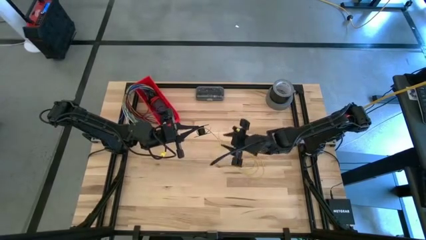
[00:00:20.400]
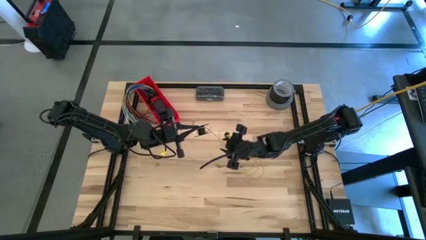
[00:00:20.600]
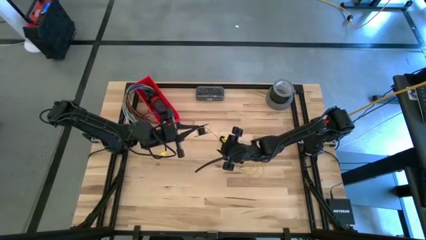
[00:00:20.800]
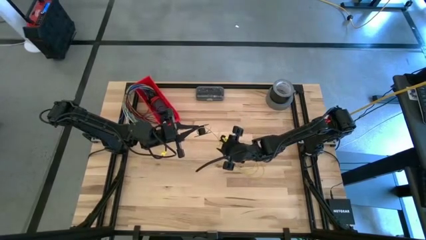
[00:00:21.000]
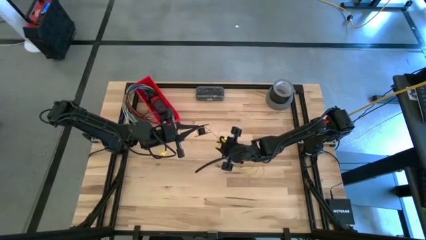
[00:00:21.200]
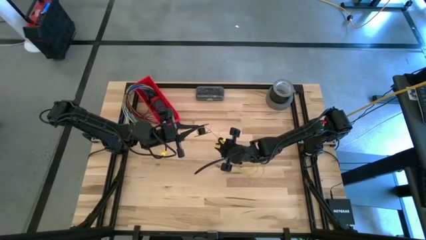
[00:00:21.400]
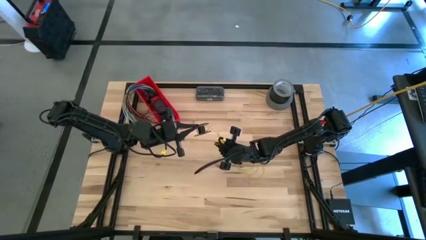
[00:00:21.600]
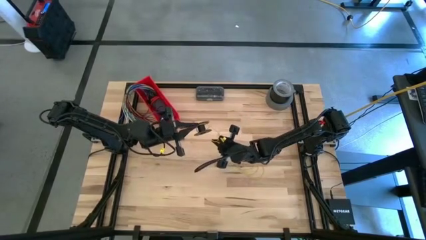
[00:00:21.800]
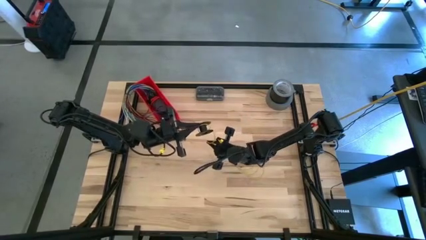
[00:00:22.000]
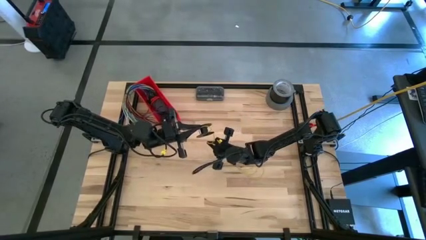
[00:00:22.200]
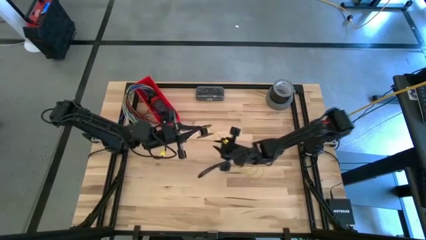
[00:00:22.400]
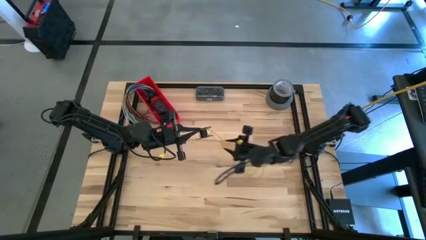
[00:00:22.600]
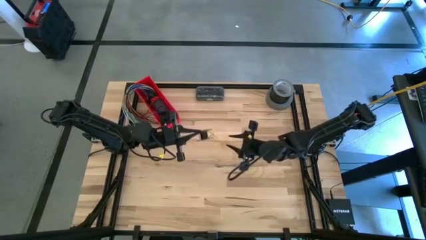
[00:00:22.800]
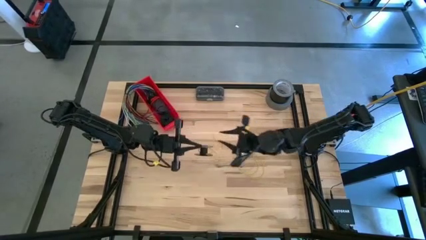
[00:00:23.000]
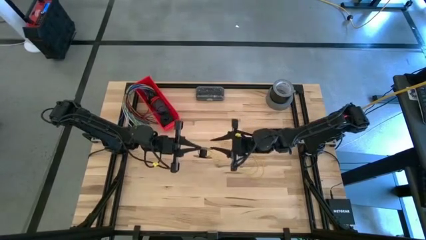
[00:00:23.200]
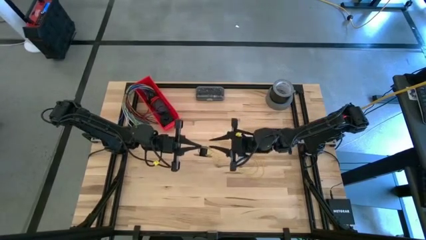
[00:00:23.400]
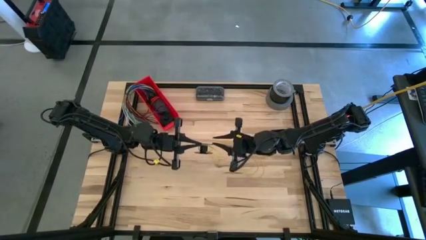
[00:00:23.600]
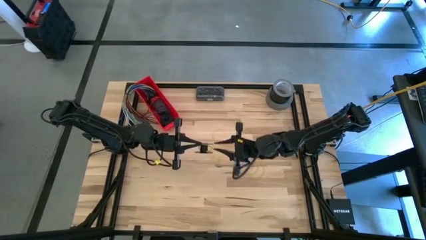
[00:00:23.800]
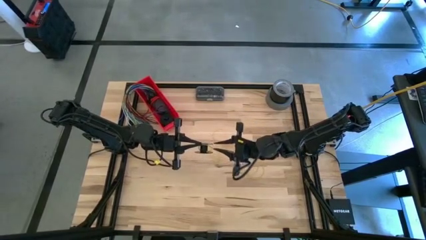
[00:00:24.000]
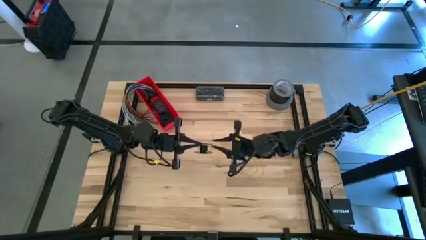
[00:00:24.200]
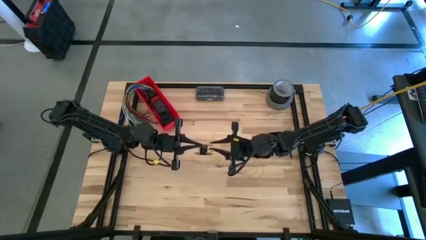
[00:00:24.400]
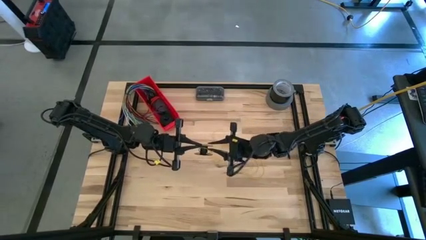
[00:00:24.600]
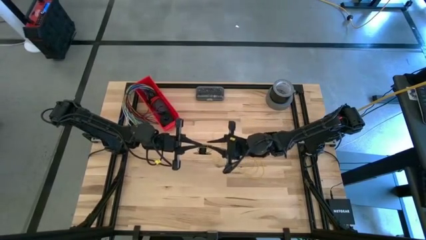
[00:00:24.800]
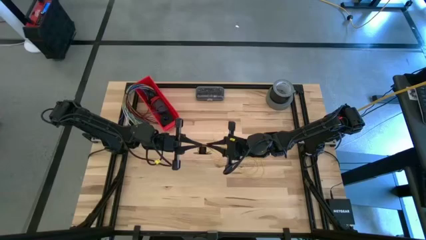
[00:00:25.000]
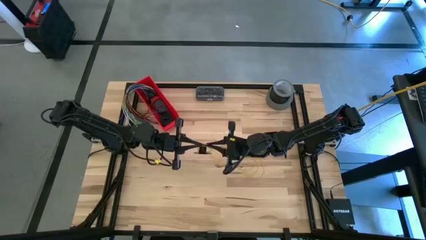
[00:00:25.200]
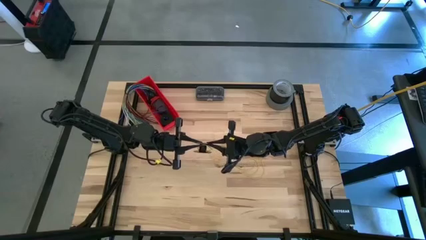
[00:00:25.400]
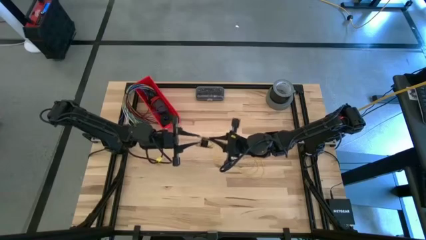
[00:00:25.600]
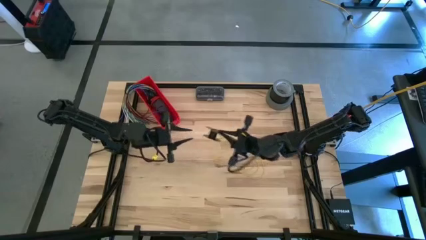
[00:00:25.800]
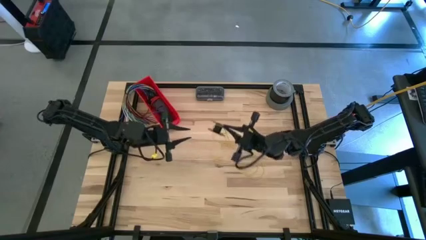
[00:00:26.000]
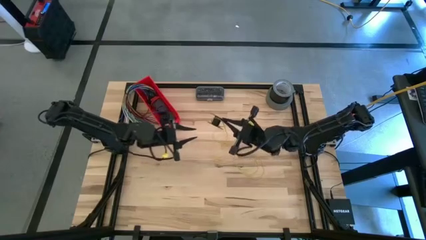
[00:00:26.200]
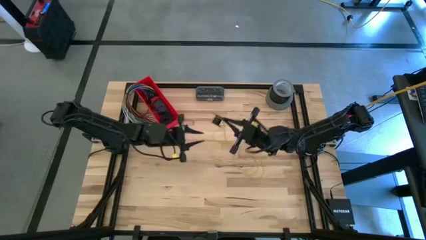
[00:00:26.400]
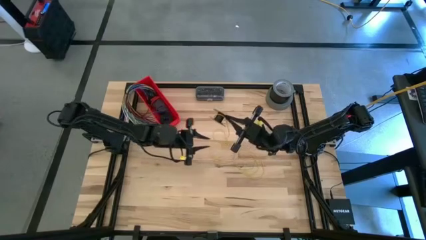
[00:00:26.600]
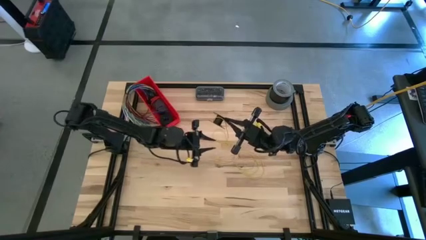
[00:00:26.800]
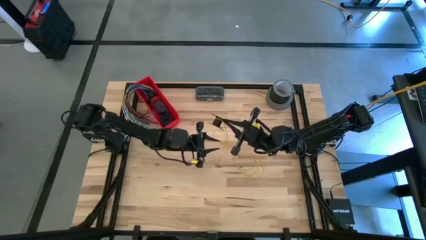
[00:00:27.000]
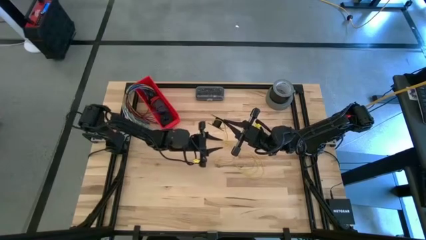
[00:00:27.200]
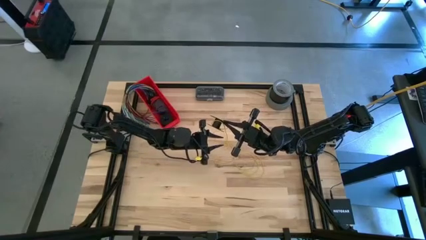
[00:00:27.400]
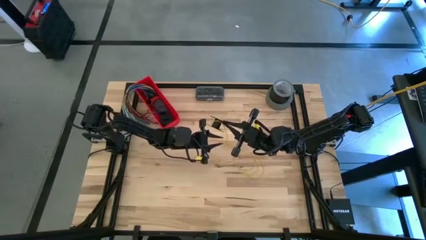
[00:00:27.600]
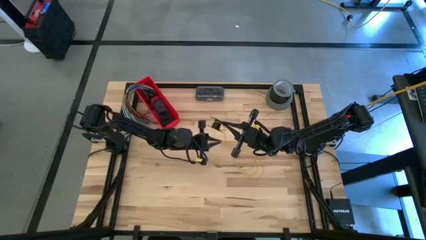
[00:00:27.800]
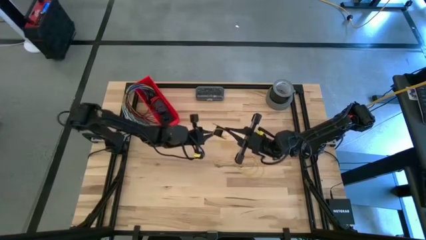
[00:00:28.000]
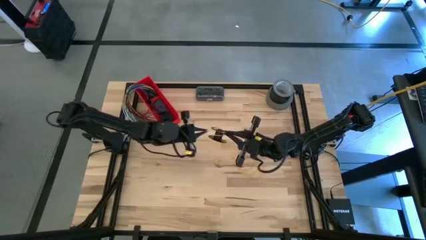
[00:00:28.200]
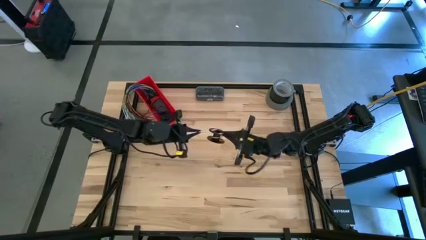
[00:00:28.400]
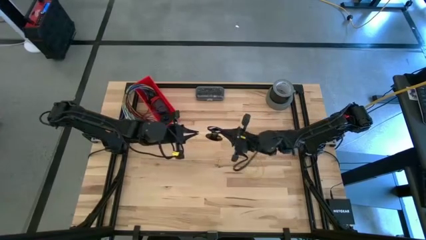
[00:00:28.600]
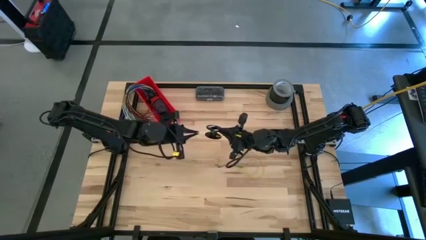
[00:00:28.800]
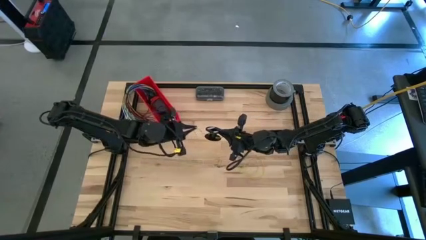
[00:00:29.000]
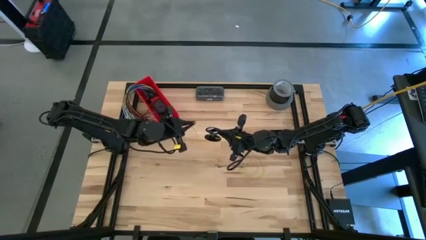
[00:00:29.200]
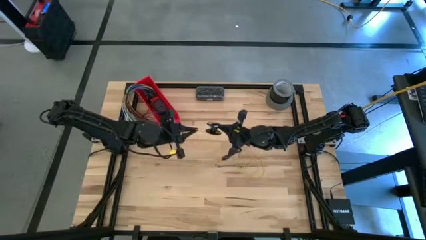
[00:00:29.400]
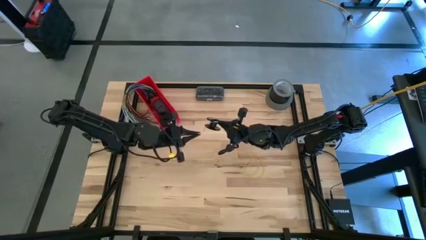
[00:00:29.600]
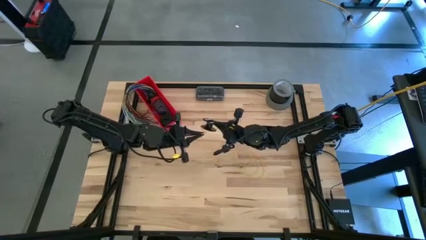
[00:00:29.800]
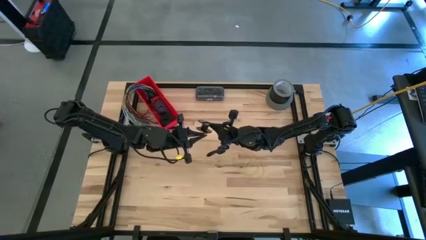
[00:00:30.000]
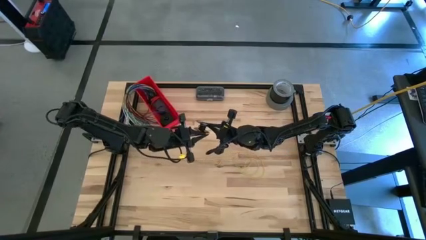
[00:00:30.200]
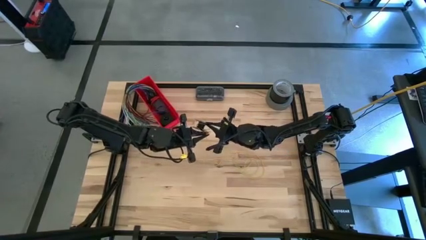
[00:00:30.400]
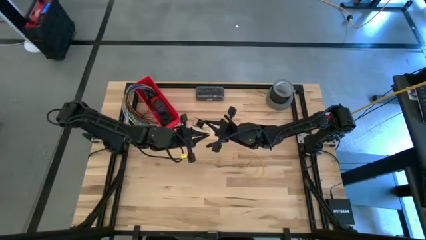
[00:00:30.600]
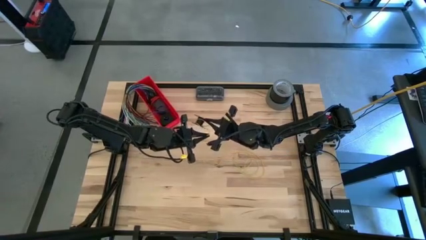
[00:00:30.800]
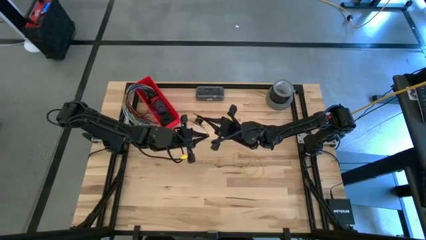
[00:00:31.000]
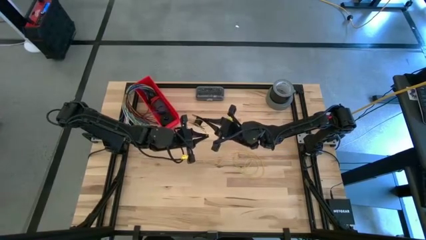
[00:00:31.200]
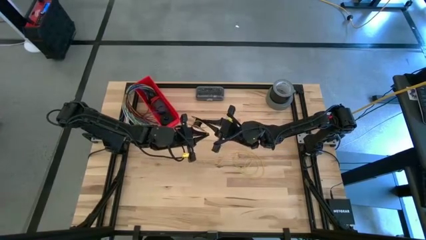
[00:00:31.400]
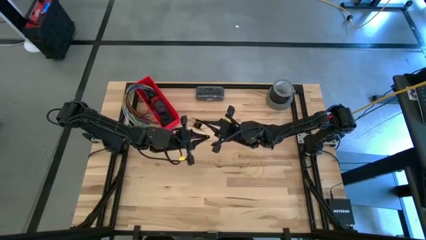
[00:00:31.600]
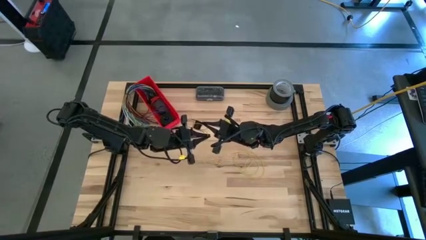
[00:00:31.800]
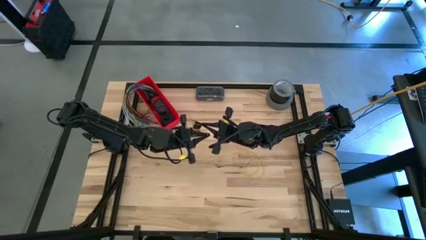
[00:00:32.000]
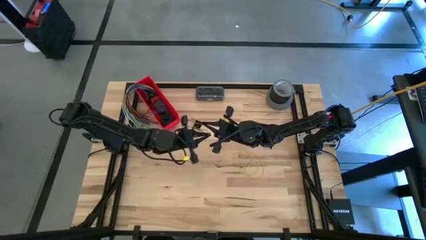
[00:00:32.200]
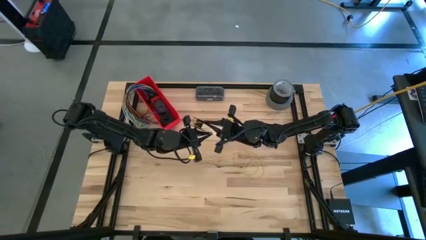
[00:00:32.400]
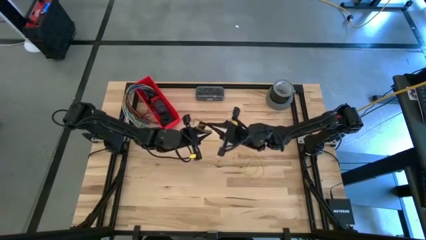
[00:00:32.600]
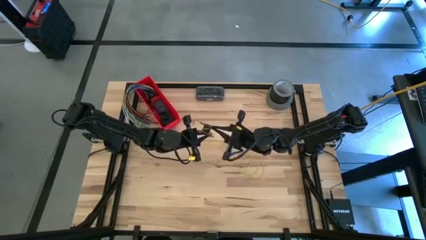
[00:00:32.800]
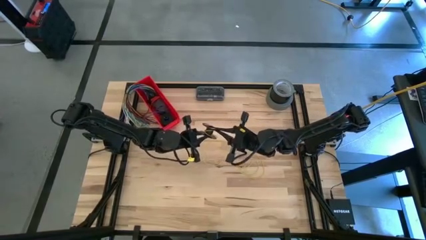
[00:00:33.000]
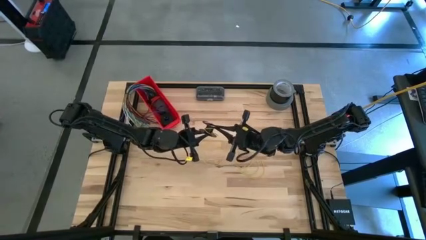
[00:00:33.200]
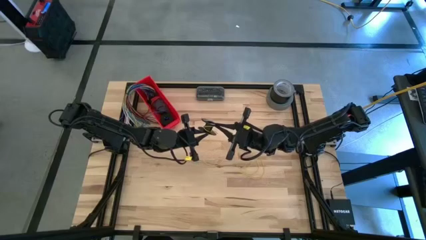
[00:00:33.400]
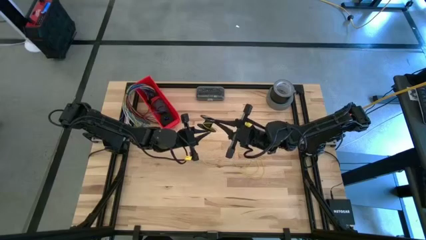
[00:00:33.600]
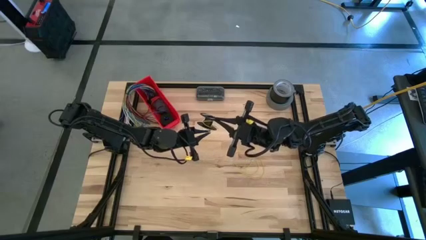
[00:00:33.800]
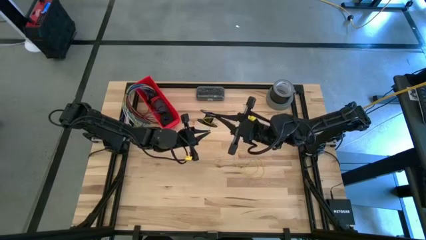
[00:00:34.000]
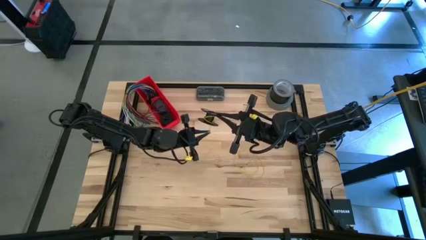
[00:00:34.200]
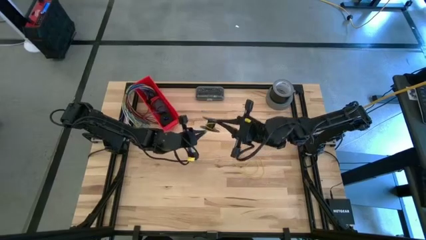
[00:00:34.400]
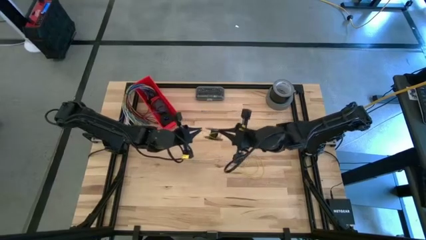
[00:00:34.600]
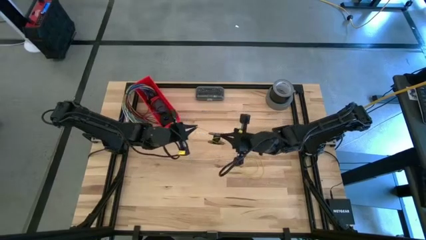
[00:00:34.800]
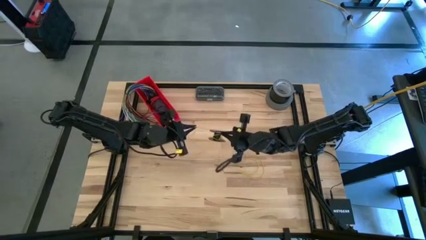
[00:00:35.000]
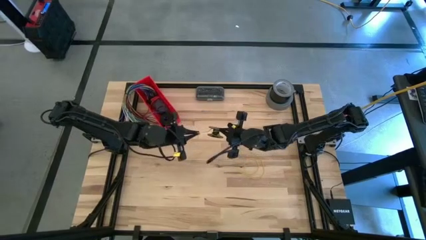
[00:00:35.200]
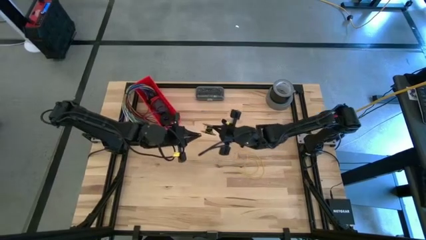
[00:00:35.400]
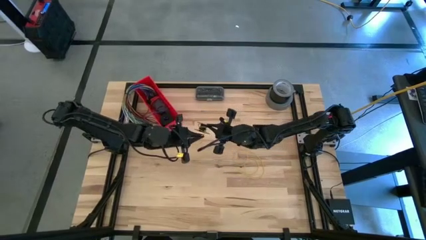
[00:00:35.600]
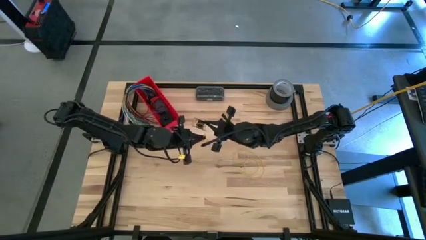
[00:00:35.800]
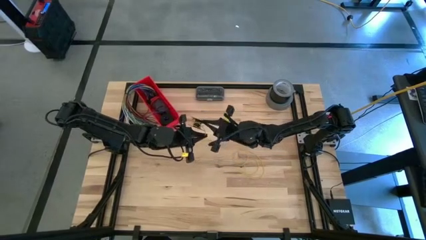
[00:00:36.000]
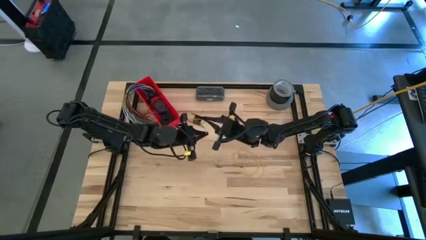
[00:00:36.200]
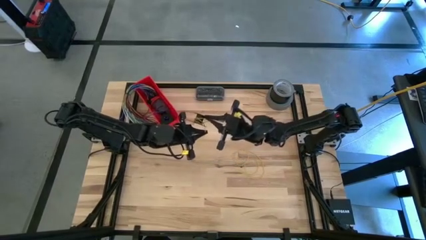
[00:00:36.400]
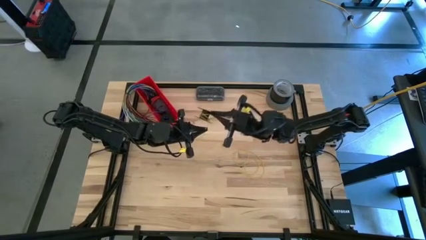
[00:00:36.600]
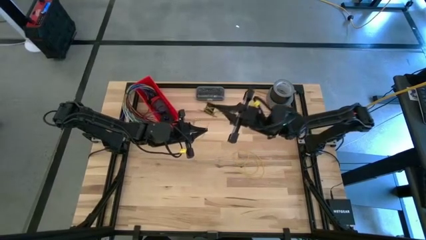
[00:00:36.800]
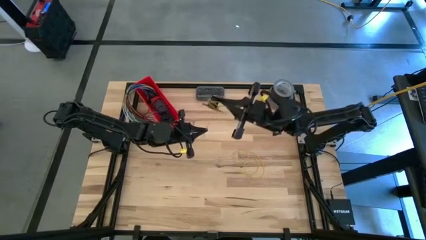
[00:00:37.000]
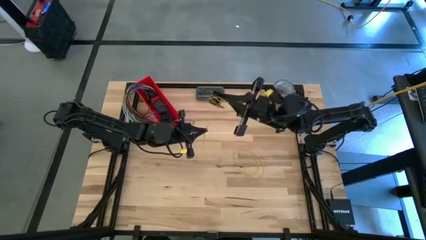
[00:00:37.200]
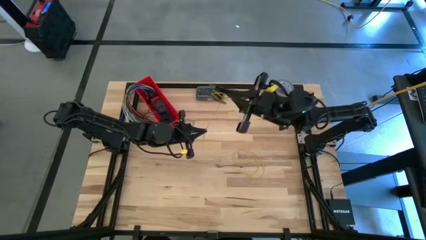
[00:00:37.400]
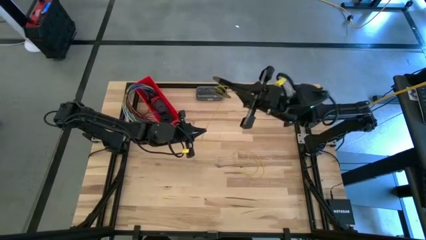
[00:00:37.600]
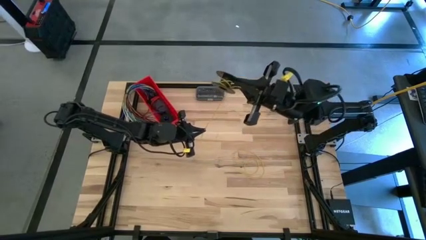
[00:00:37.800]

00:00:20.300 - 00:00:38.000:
Task: Coil cords
Coil the yellow wire on the spool
